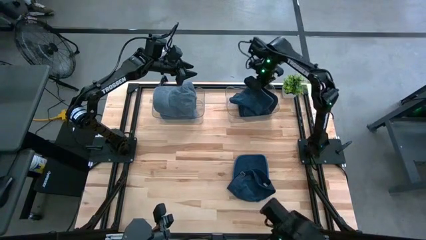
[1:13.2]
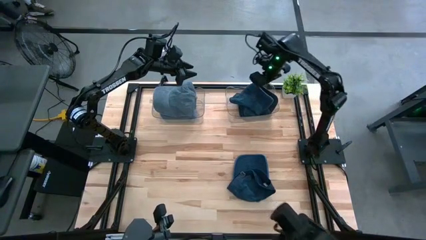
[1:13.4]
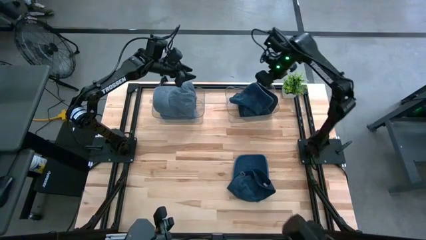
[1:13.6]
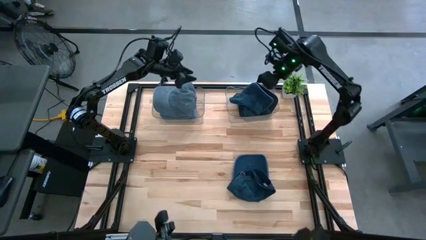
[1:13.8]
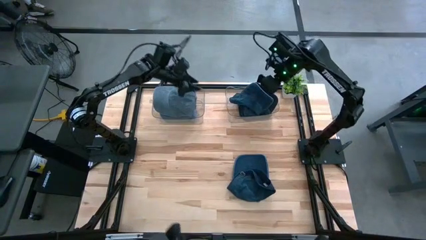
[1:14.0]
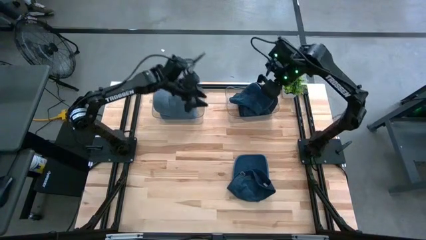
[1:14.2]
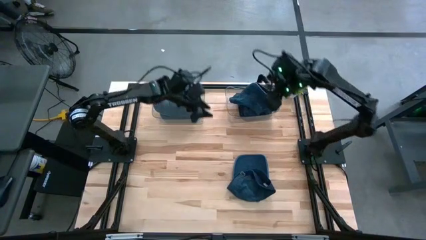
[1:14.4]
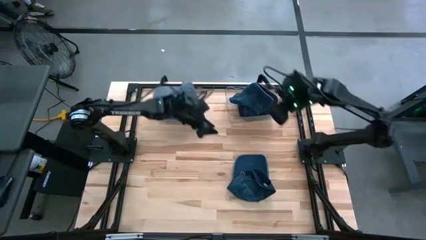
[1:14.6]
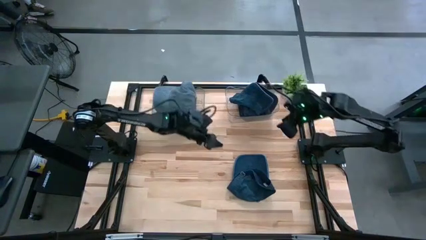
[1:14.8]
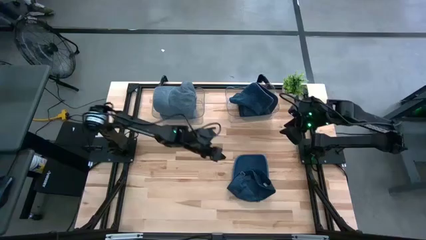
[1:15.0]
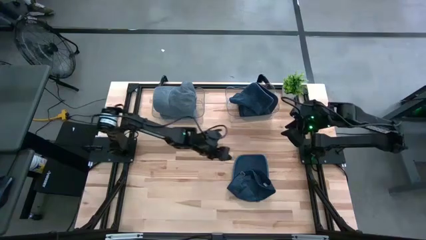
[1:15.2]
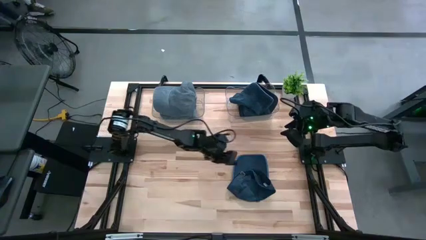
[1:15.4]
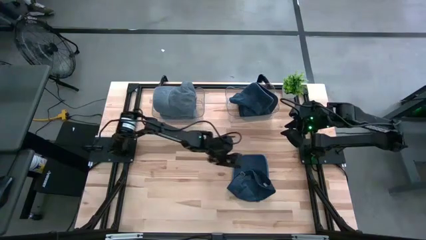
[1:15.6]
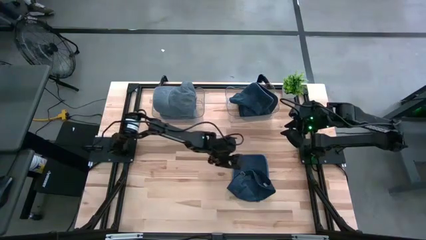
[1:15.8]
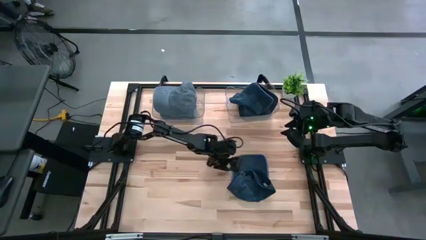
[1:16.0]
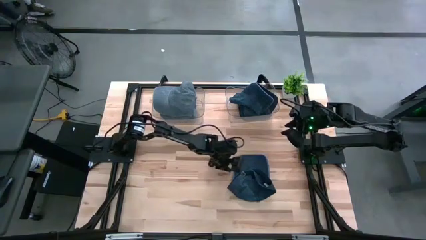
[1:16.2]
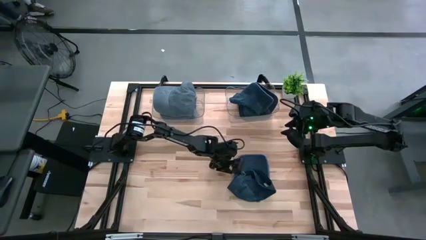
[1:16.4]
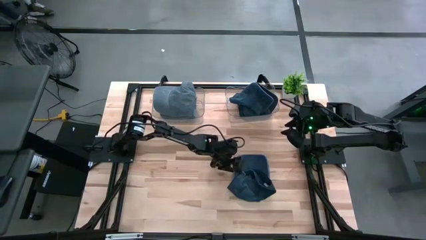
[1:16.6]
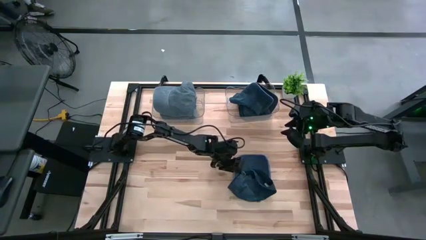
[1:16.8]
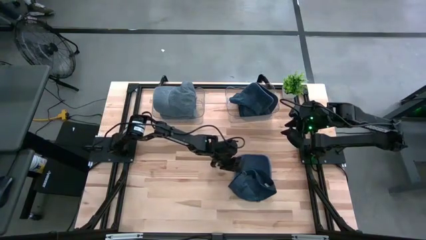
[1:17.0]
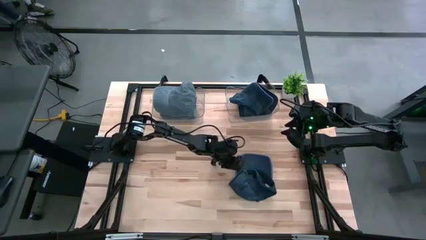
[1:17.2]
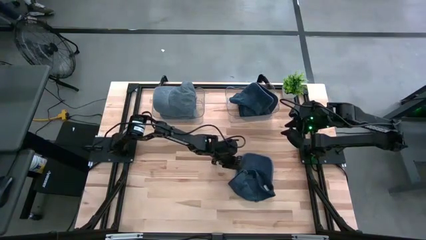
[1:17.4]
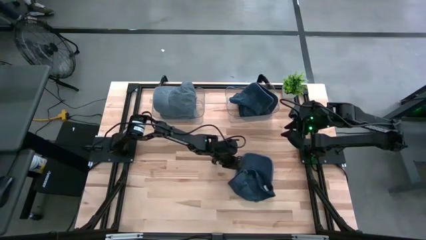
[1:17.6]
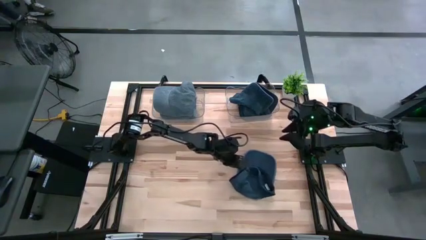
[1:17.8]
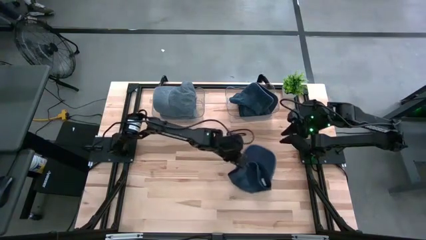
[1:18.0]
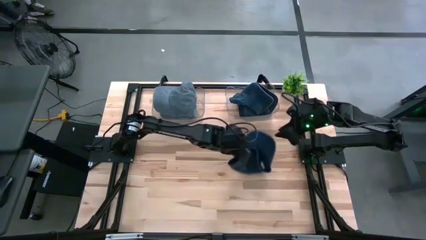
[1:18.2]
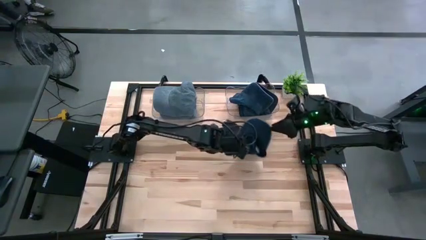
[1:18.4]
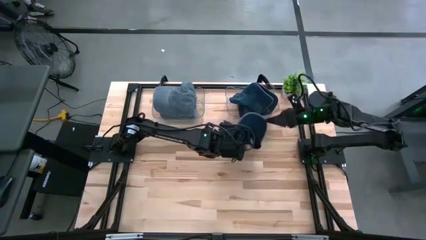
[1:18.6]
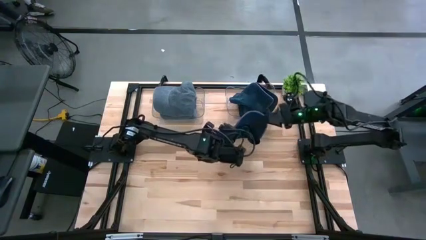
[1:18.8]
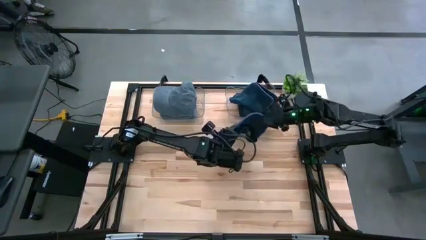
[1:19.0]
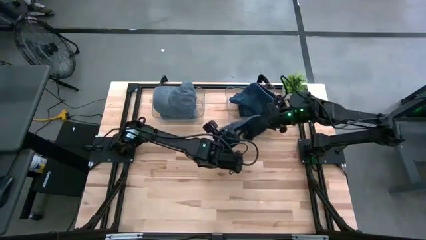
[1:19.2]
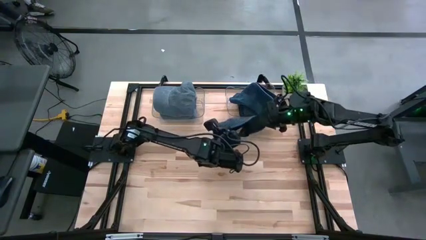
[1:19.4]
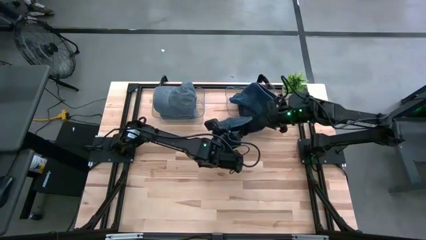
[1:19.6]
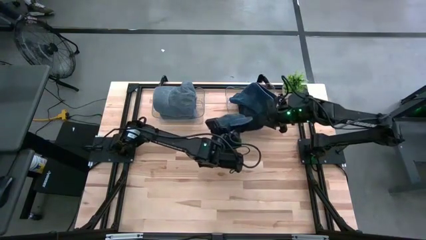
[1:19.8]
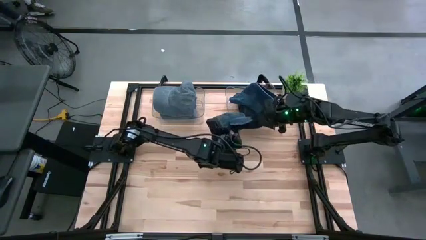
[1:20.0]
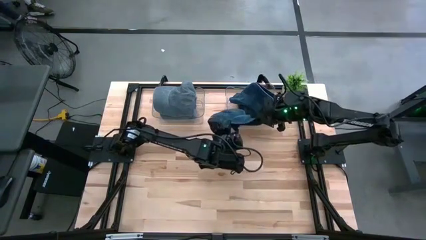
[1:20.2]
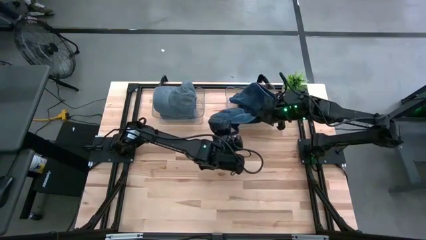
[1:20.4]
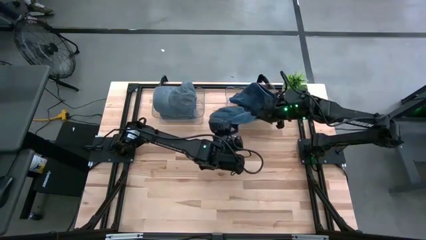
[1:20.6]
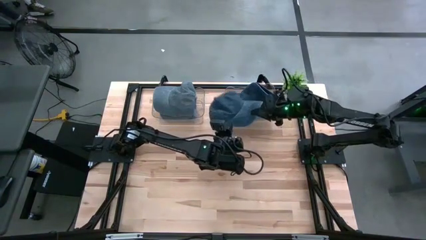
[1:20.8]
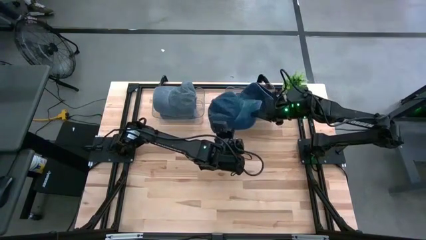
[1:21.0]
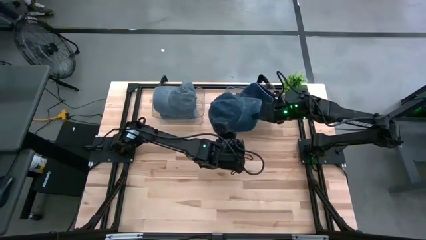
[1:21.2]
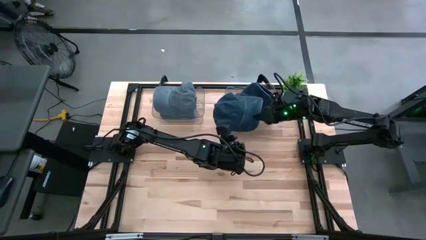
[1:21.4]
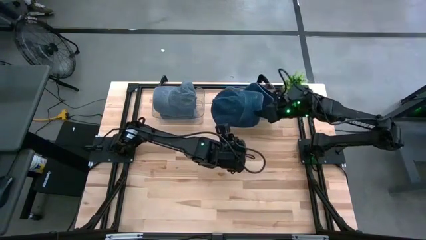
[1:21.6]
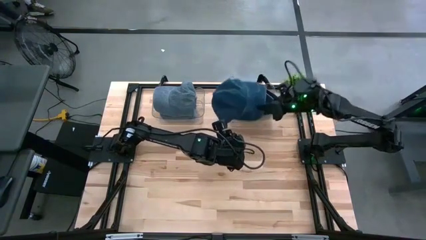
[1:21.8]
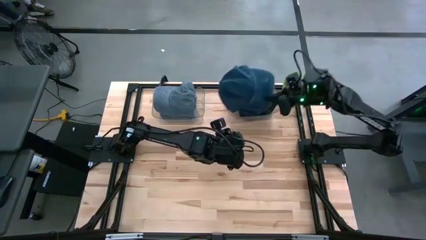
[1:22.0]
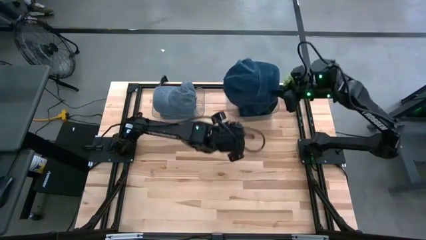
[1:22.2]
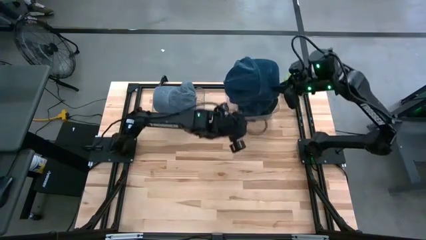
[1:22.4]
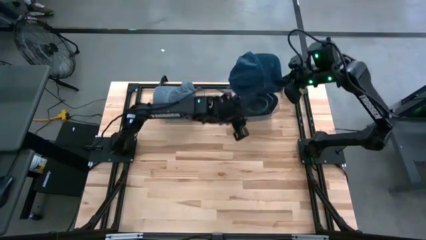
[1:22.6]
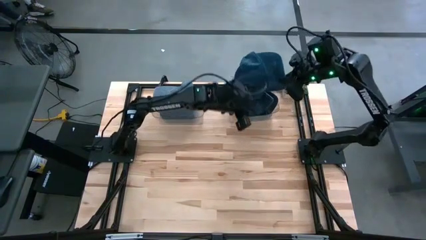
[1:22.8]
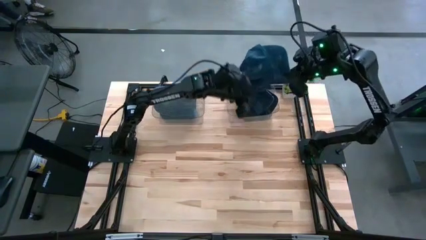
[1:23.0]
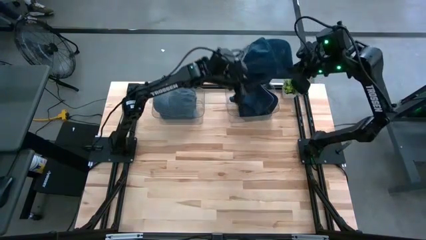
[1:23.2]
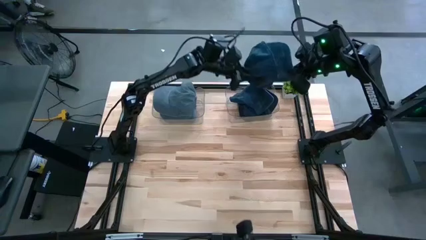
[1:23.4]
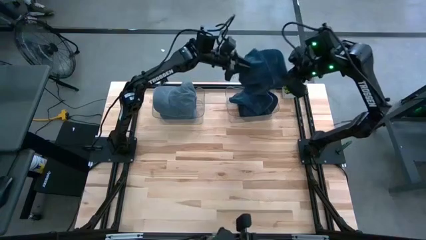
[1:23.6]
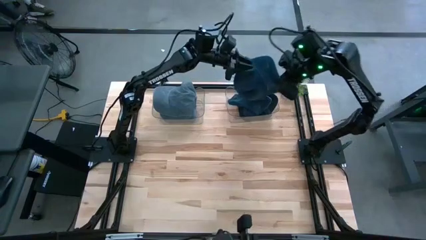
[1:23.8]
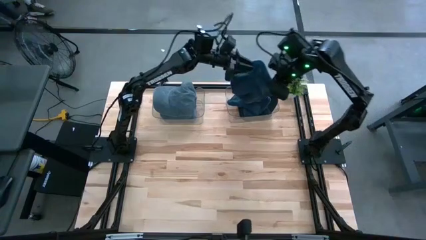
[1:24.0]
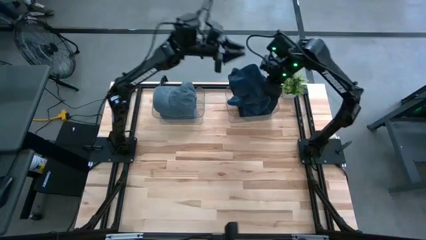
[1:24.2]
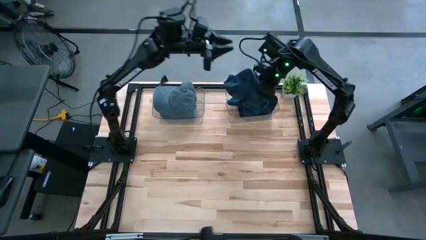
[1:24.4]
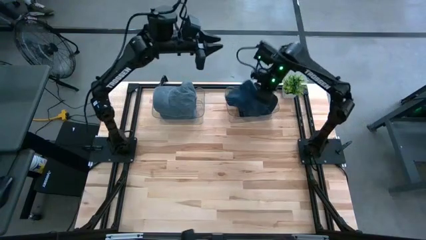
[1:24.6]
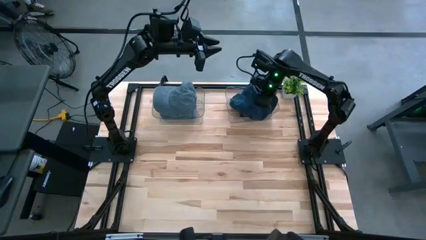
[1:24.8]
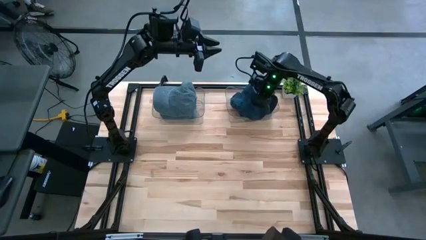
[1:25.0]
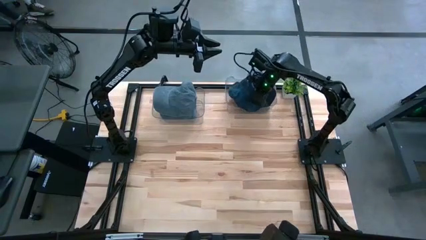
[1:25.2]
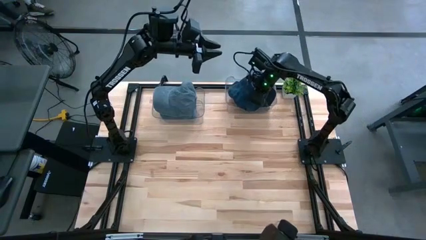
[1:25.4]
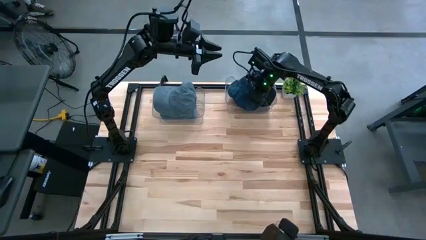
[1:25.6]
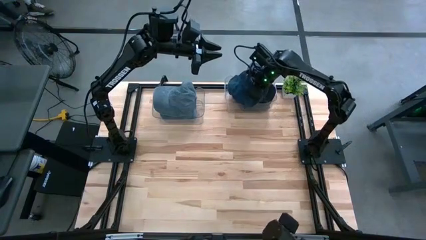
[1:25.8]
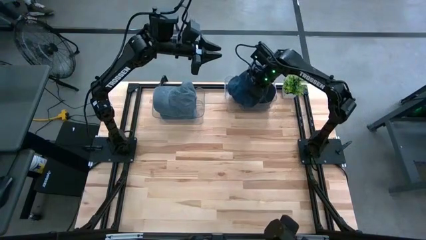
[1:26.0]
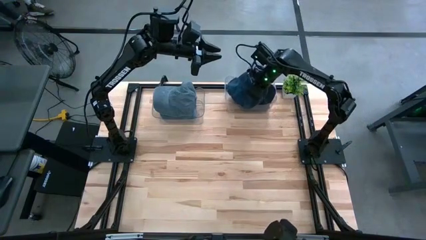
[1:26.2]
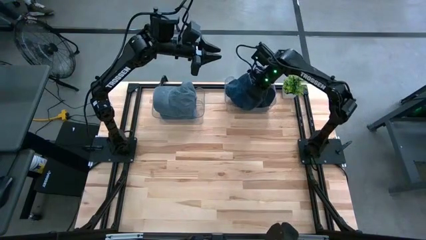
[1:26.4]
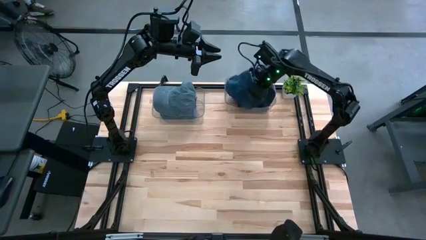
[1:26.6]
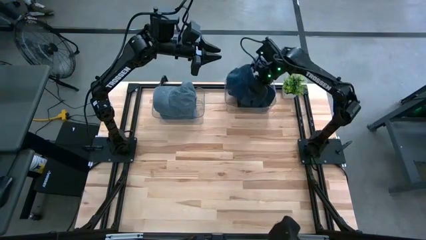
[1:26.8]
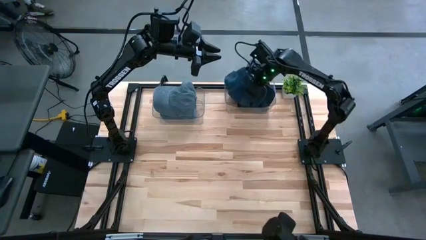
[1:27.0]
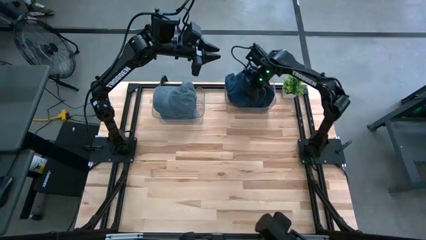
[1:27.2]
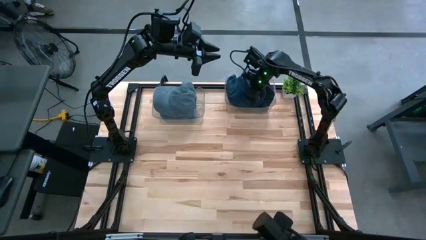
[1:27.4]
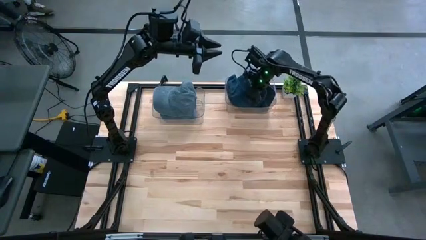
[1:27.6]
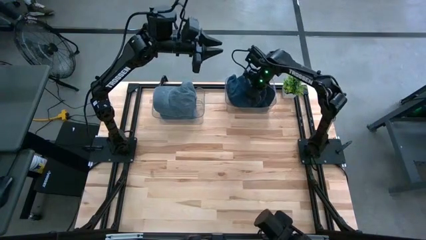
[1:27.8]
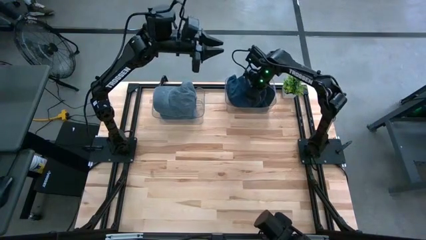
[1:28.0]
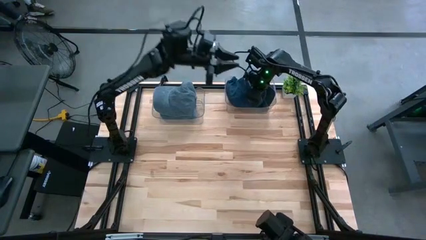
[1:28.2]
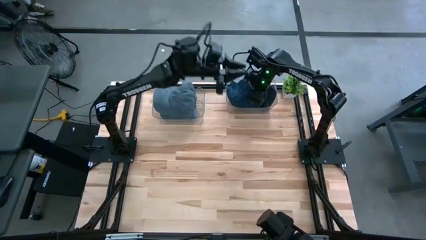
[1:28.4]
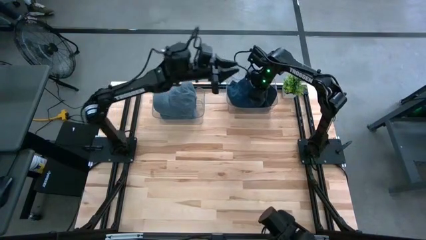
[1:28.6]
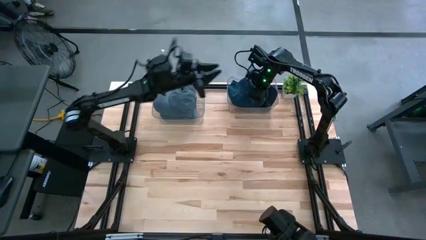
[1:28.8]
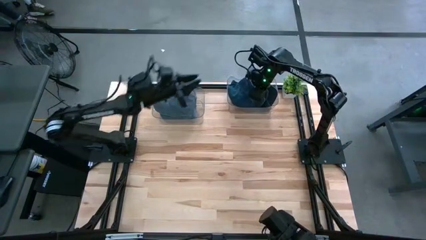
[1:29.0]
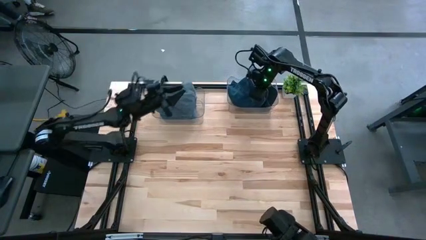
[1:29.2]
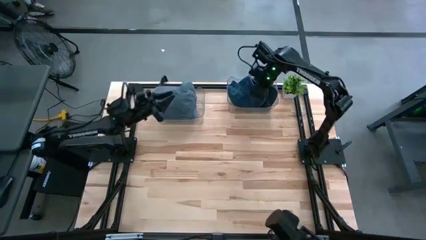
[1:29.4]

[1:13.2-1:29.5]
Task: Pick & Place hat
Put the blue cap into the right transparent bin
